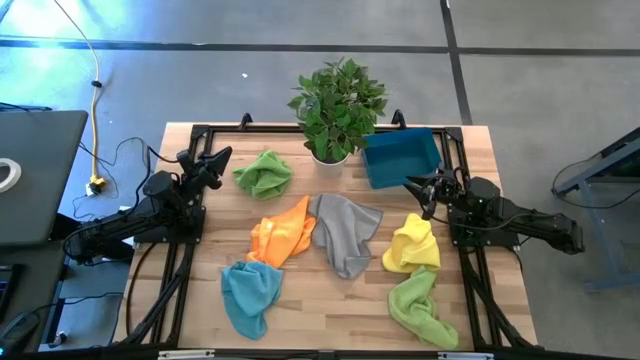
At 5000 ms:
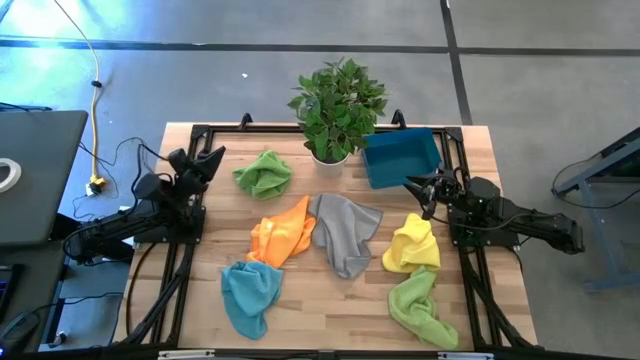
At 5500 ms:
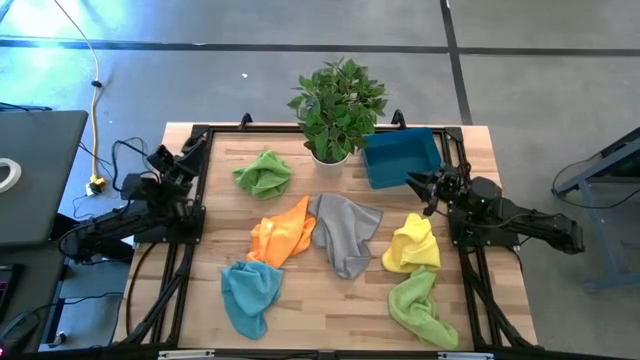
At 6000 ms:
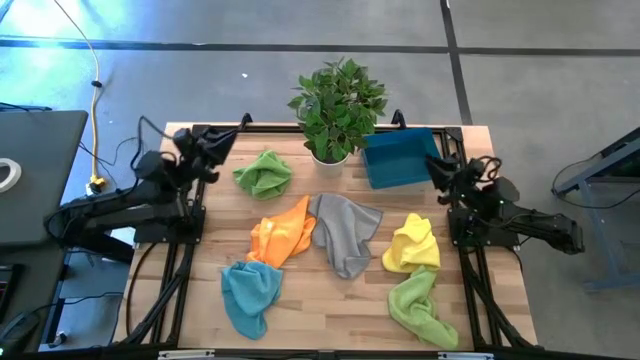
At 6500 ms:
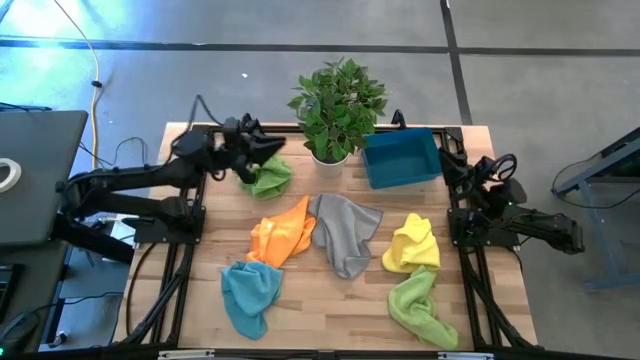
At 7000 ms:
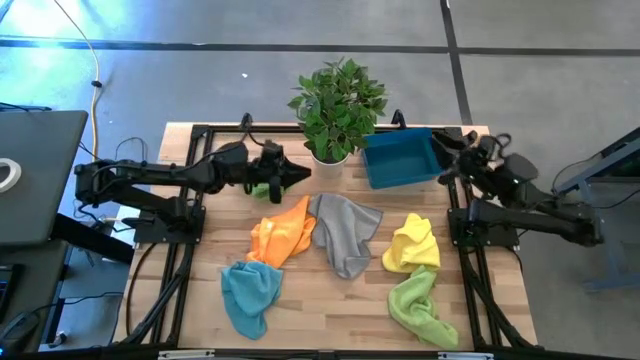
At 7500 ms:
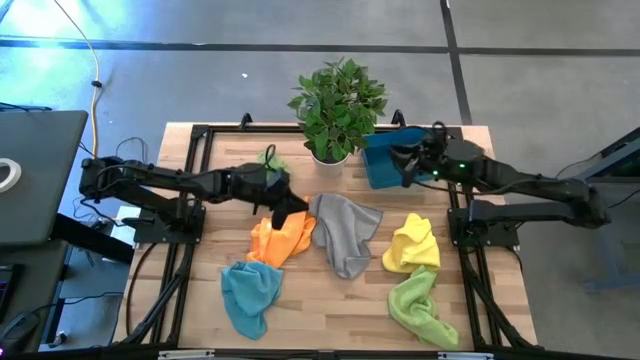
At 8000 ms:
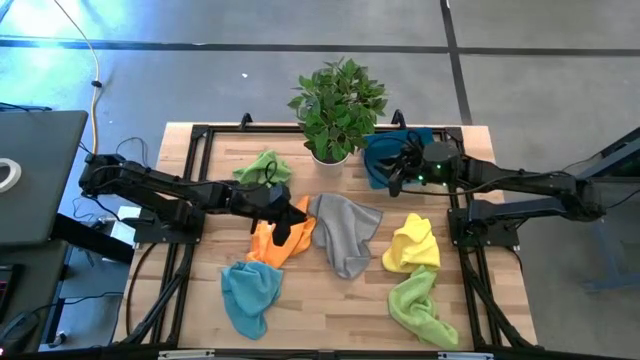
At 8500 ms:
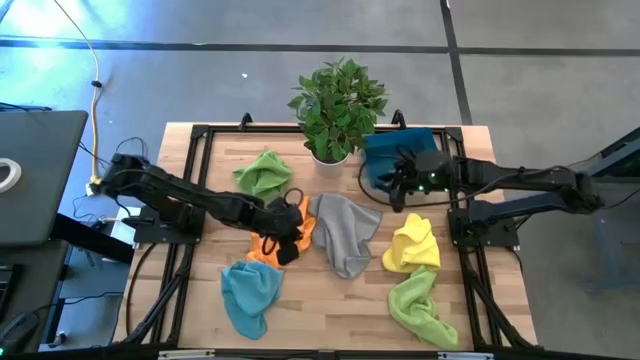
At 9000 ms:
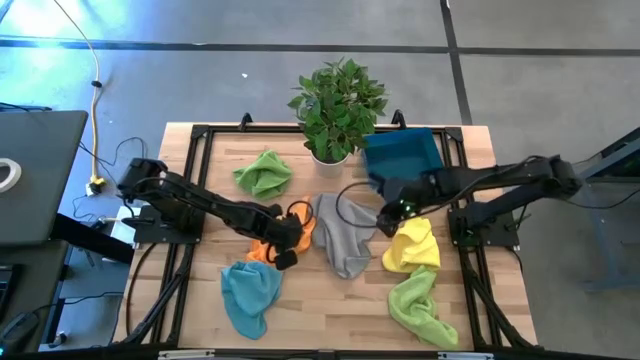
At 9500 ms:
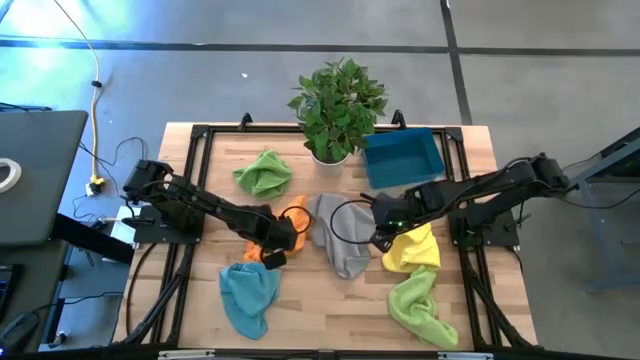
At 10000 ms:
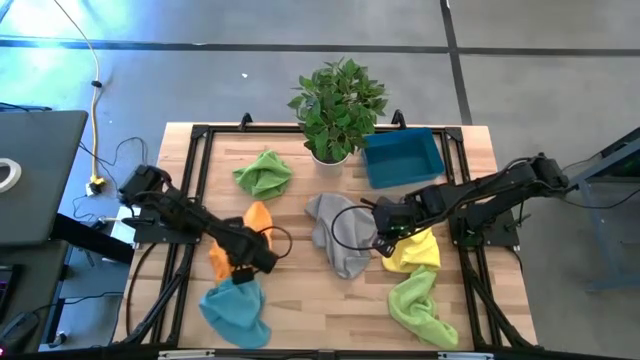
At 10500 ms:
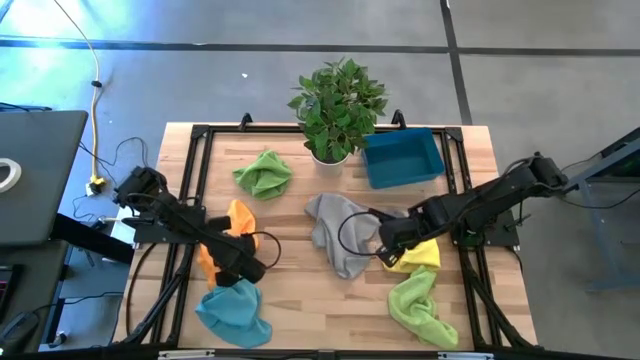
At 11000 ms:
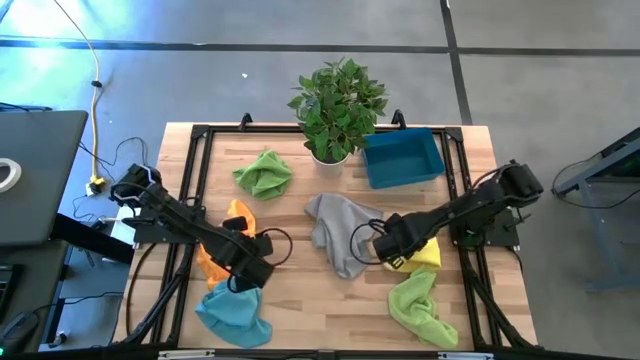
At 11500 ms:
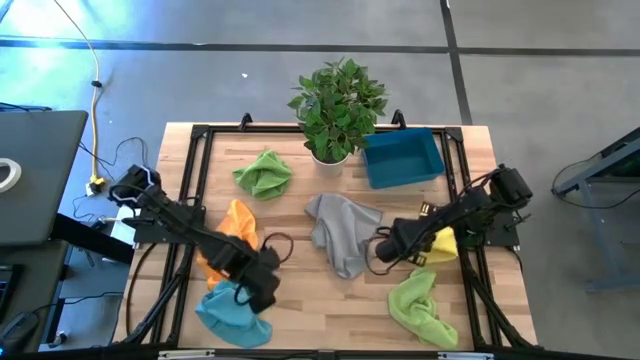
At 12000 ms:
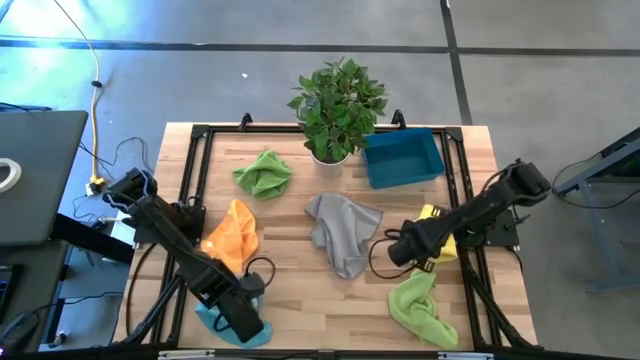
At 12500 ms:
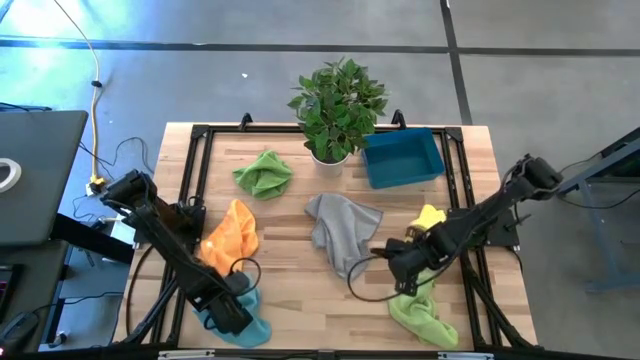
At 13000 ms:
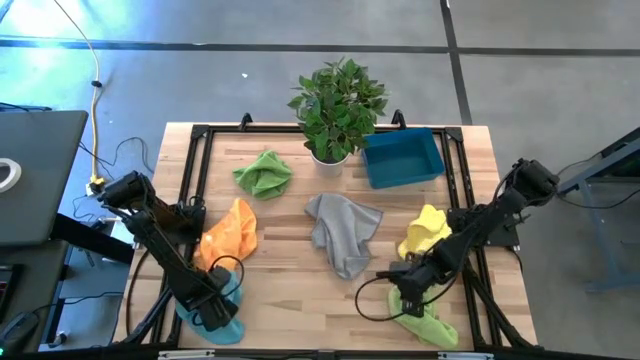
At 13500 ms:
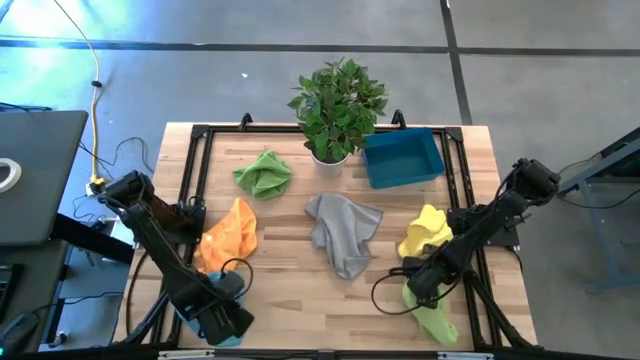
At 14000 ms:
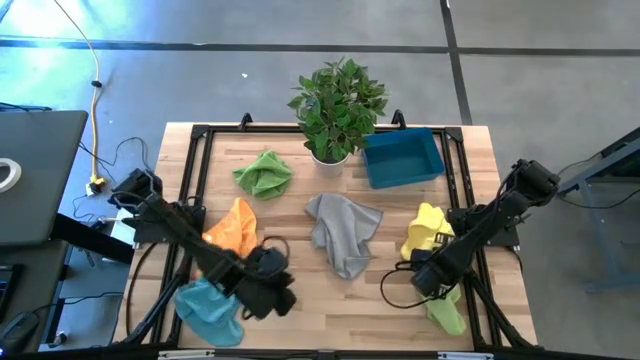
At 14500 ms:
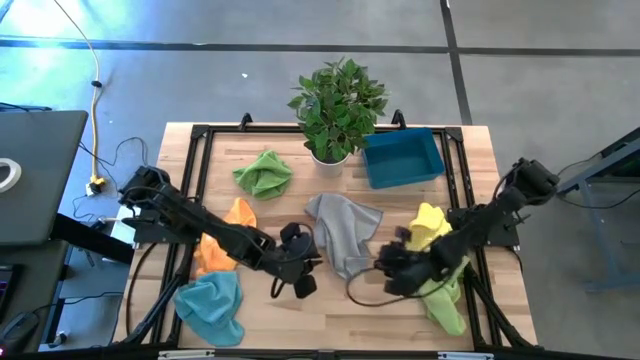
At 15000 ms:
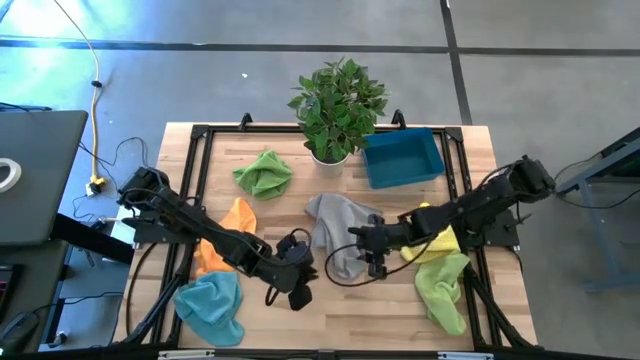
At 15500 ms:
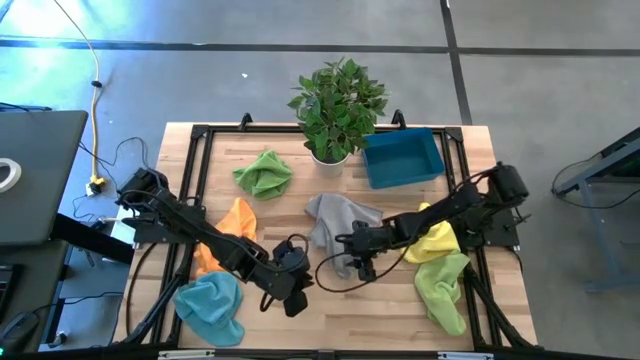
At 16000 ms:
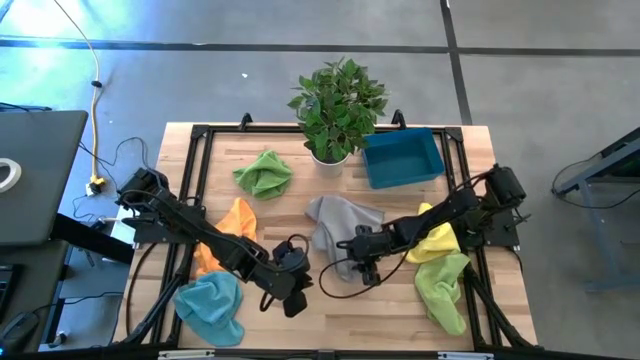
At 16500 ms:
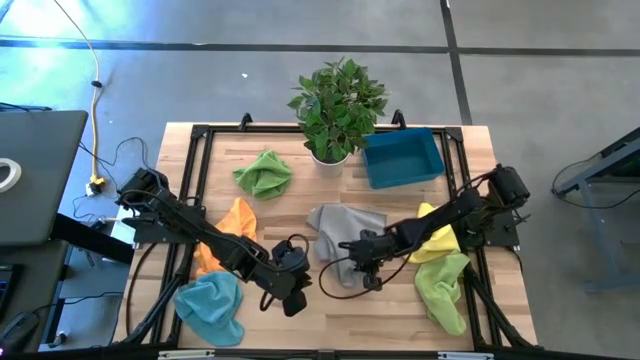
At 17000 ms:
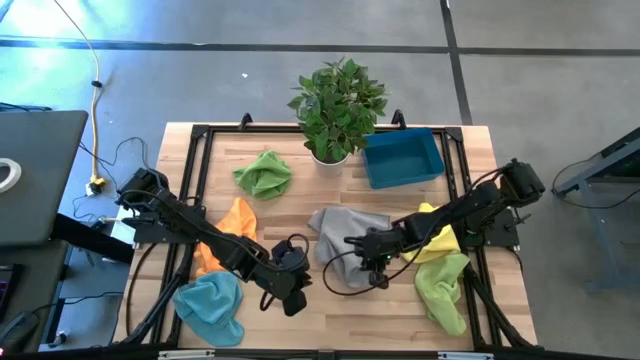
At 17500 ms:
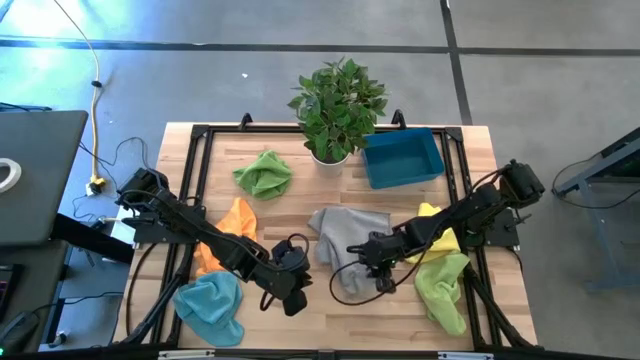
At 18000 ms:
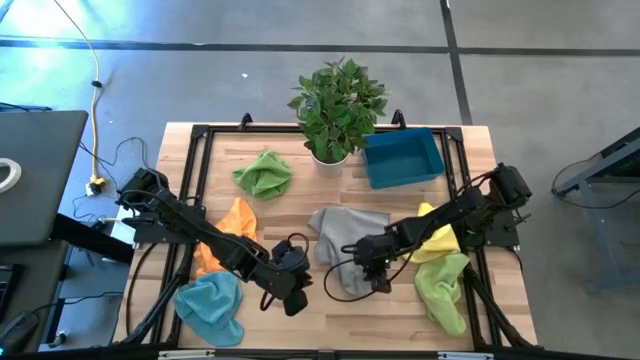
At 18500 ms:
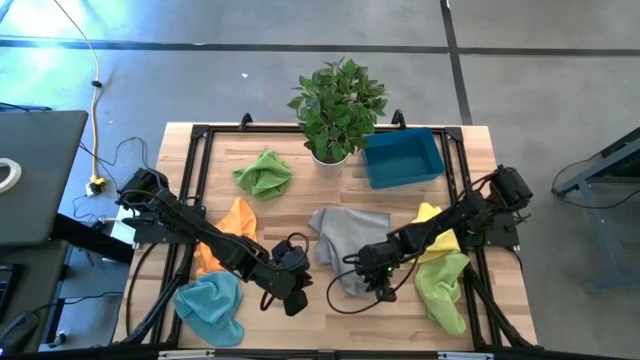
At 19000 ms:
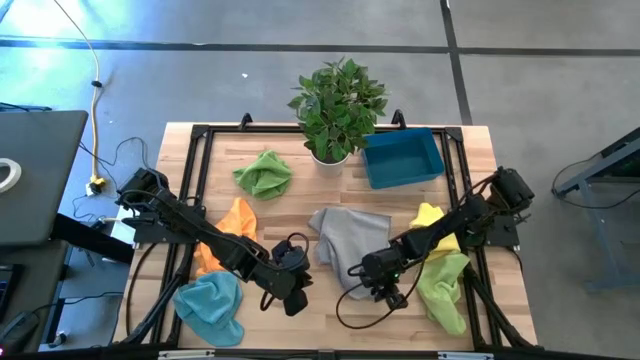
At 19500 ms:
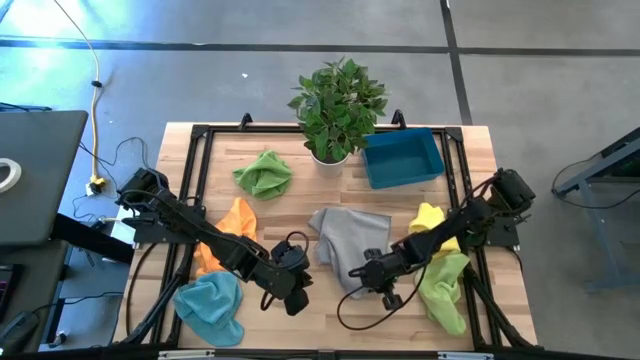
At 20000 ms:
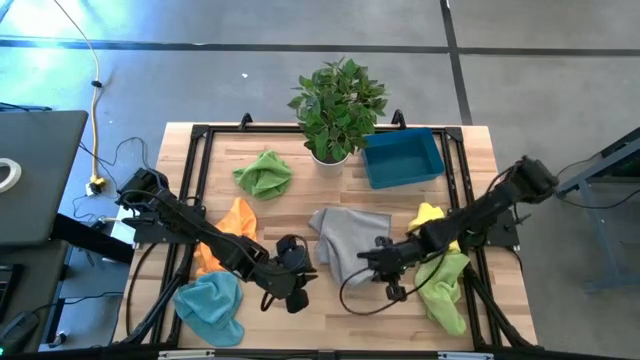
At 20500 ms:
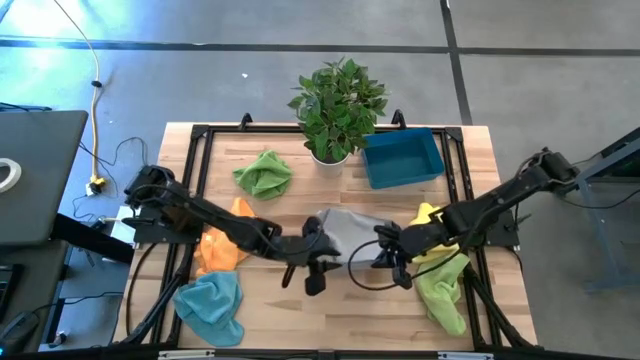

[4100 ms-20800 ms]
Task: Sort microfiber towel by color & place in baskets
Fold the gray towel
